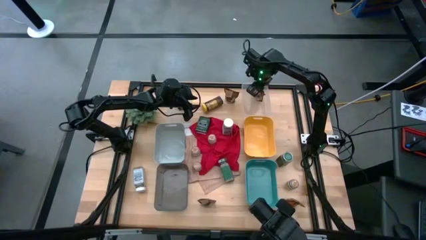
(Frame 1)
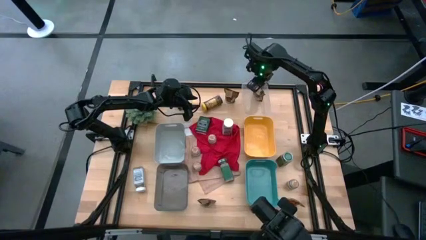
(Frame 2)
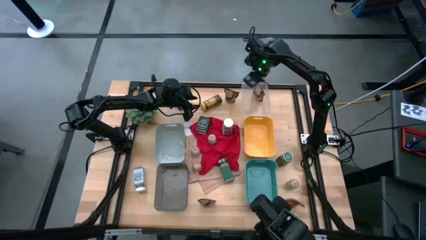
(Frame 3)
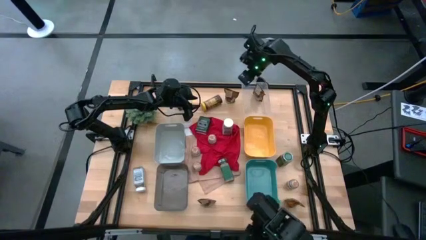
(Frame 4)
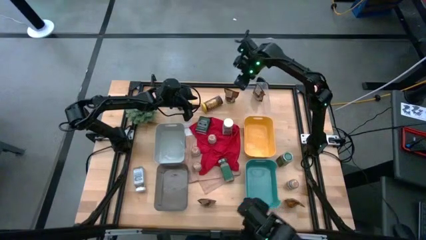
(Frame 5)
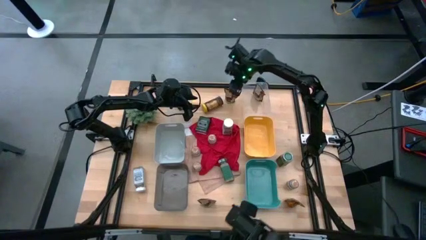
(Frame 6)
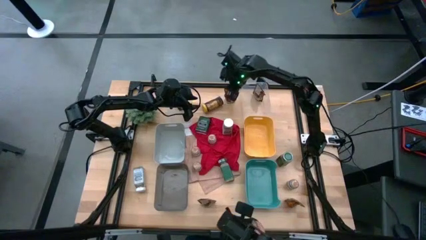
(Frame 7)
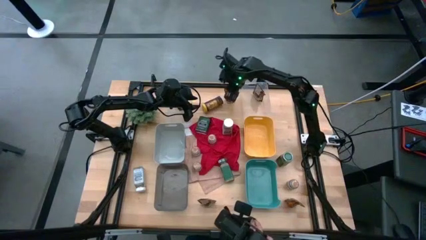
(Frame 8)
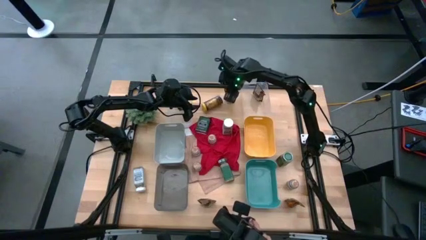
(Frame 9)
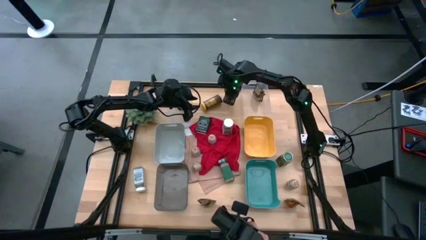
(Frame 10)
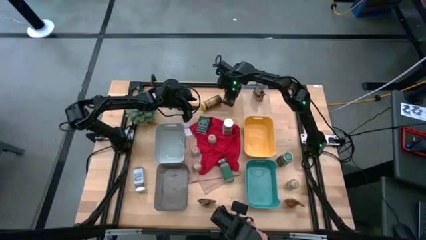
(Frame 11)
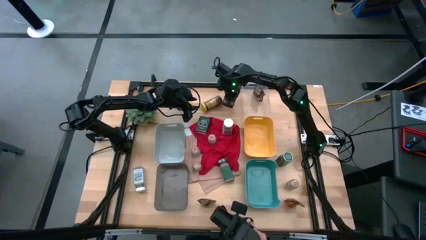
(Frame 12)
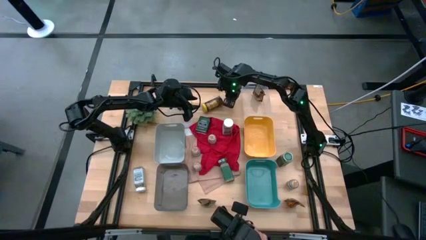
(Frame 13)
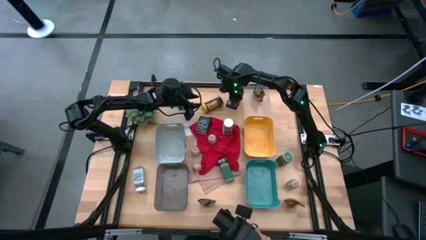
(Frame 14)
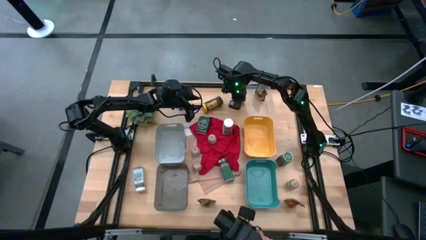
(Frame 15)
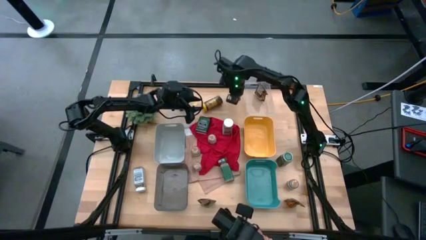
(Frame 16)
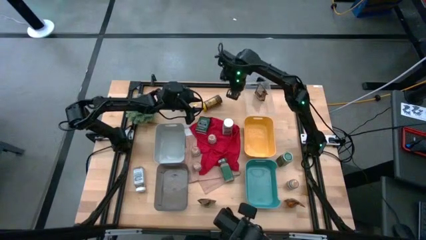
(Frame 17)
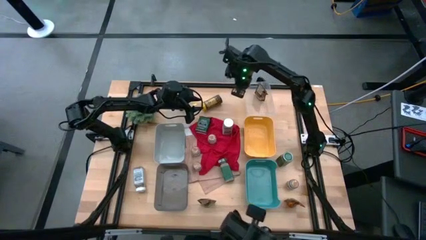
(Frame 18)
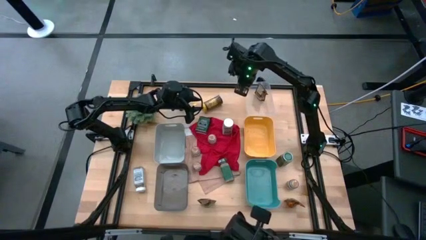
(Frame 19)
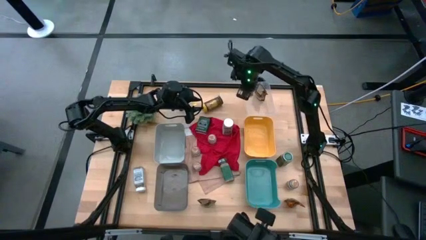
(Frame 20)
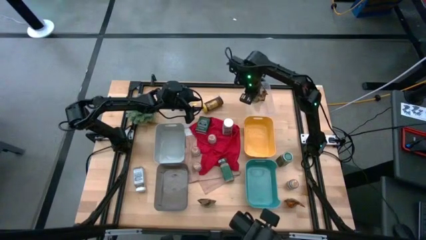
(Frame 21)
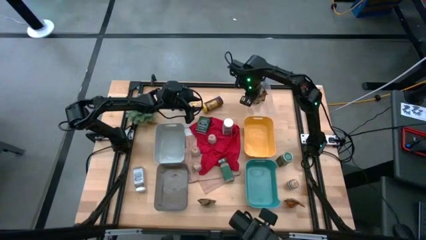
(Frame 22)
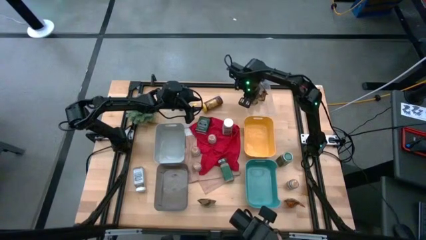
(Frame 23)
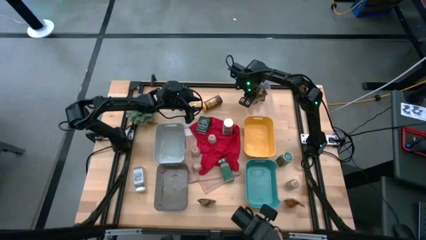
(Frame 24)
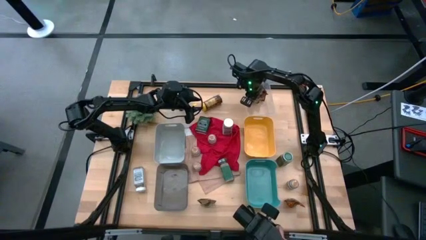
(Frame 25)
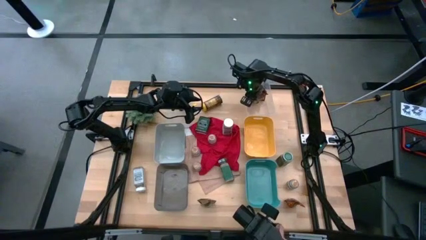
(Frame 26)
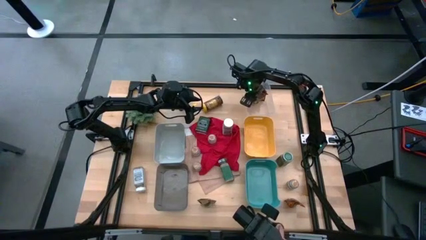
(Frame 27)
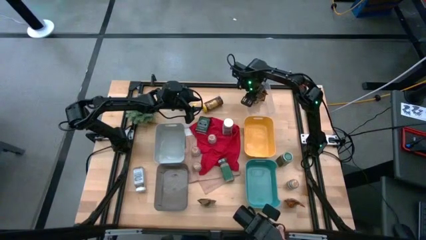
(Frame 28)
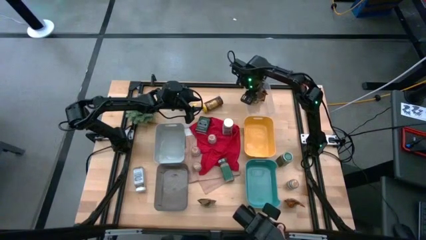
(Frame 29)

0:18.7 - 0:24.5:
Task: Sort spices by type
Put the top center orange seasoning bag into the right transparent bin

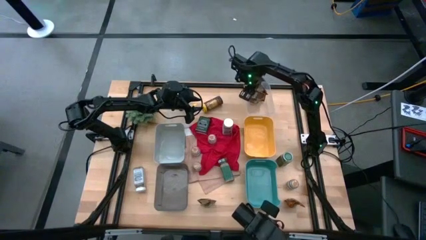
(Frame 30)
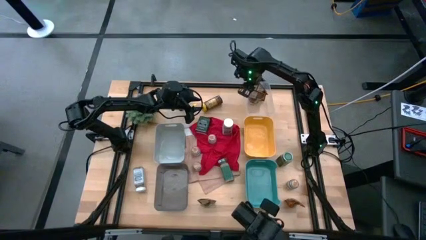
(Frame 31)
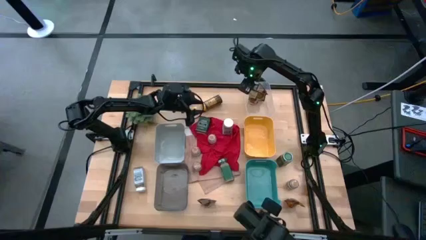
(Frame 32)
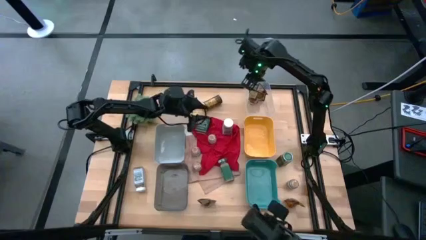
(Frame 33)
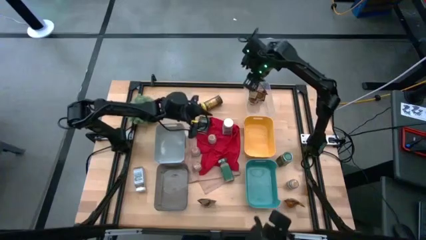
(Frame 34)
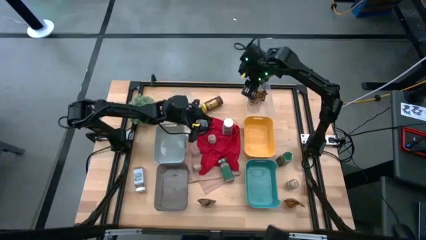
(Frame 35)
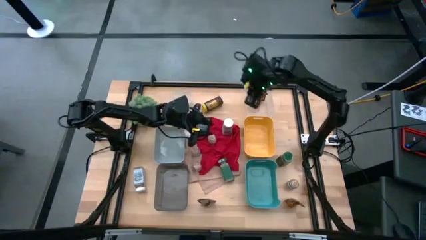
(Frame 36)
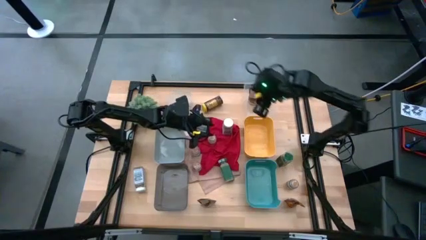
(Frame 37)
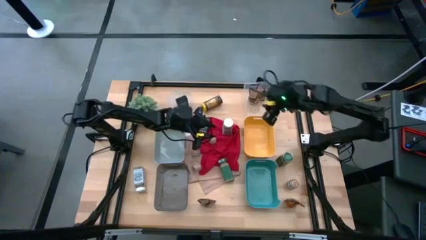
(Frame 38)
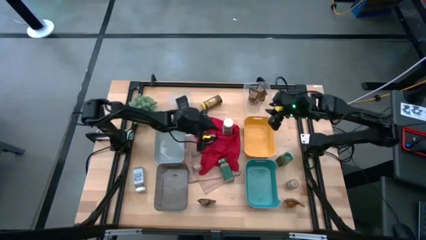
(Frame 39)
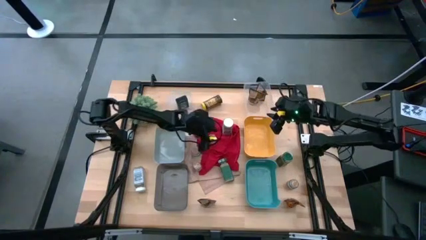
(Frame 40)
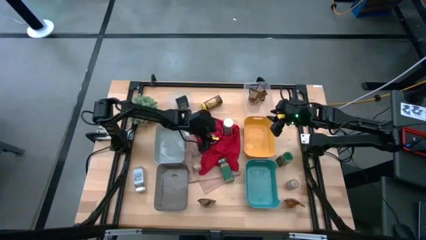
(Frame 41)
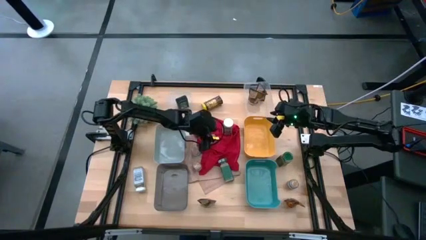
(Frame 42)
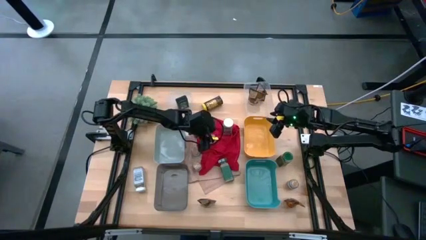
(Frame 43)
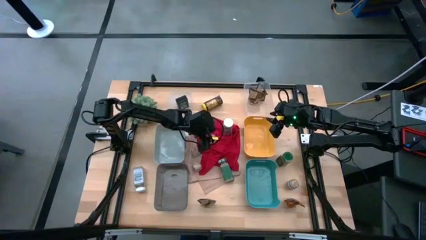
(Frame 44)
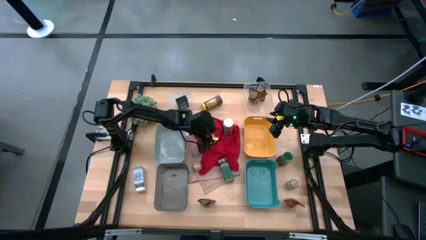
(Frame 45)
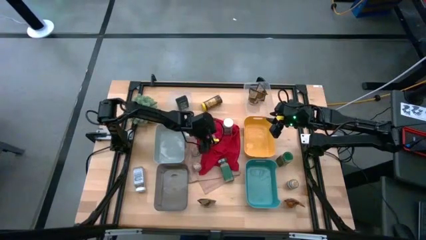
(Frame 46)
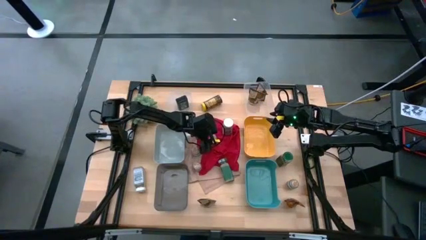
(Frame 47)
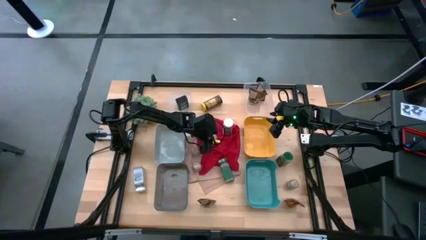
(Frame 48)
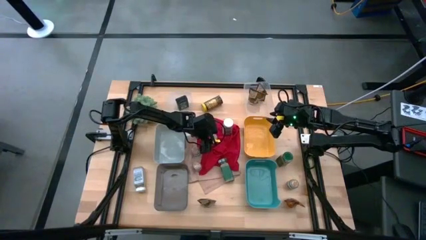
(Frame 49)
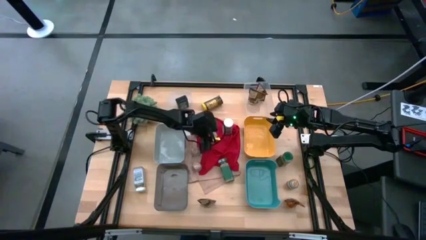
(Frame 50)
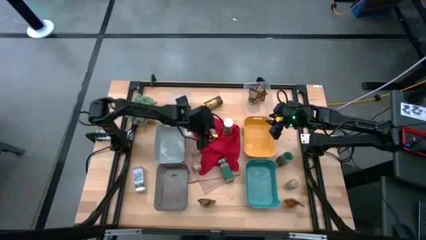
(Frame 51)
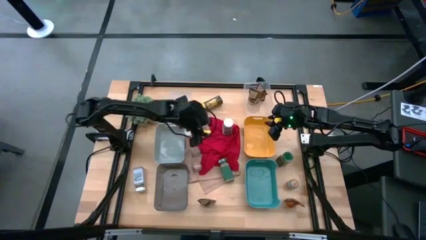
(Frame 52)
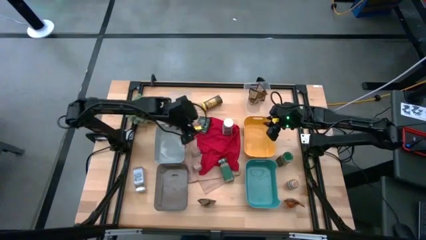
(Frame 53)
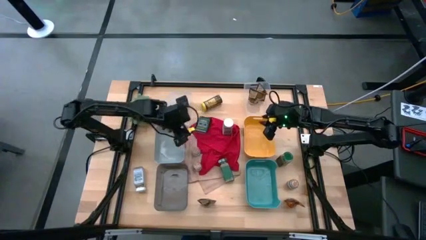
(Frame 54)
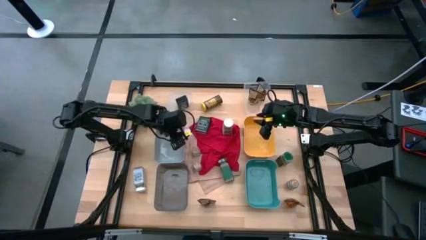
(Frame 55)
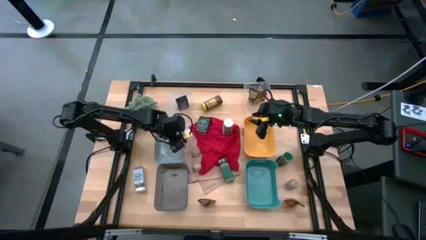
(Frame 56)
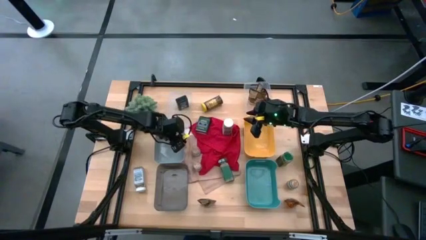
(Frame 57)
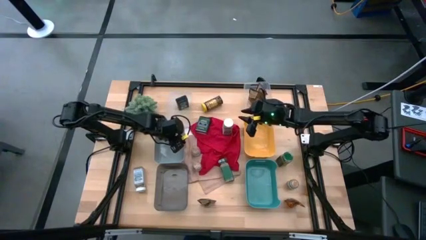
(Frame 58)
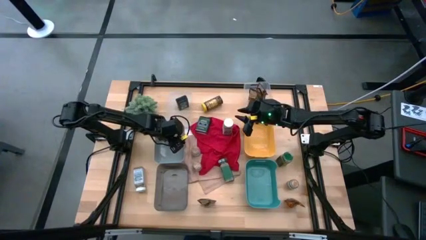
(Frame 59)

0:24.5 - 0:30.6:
Put the top center brown seasoning bottle into the gray bin

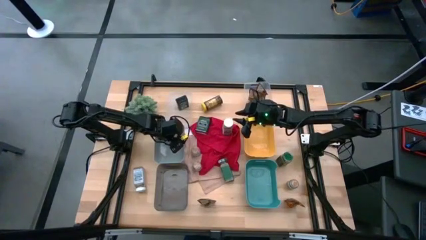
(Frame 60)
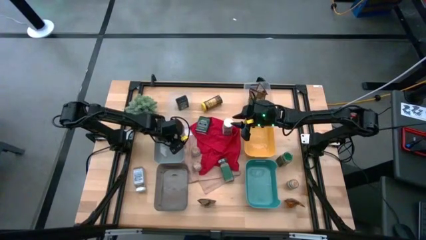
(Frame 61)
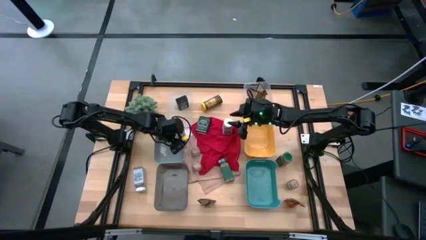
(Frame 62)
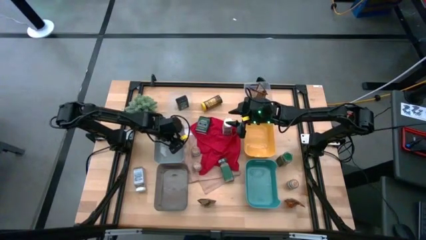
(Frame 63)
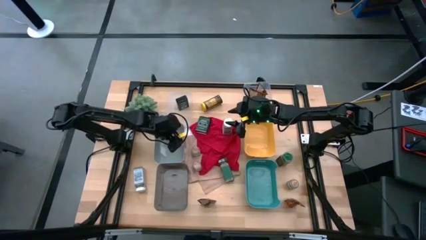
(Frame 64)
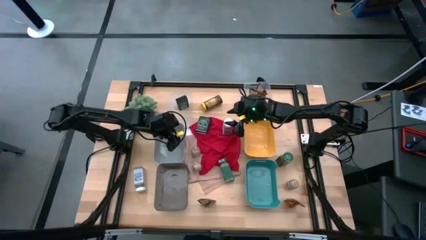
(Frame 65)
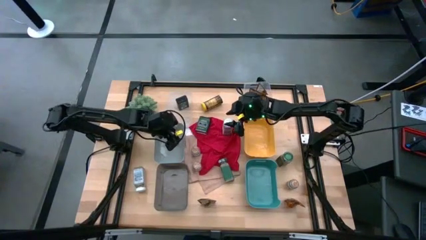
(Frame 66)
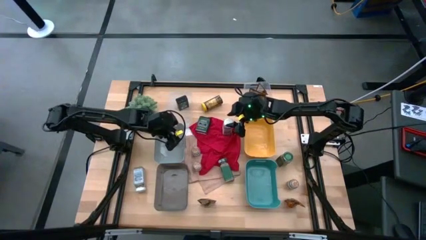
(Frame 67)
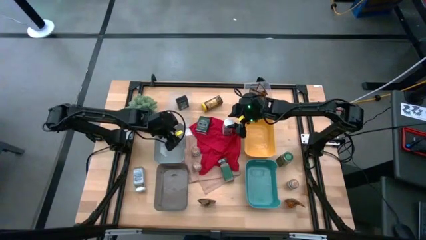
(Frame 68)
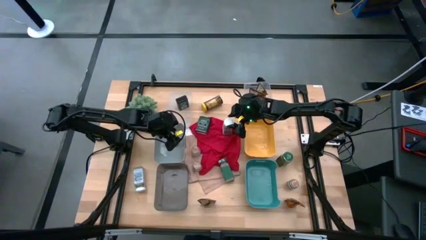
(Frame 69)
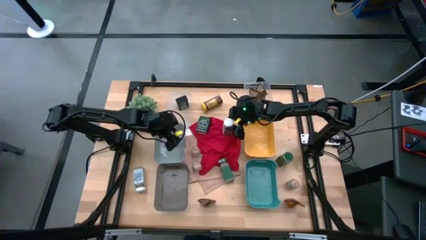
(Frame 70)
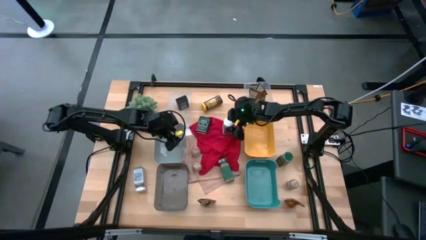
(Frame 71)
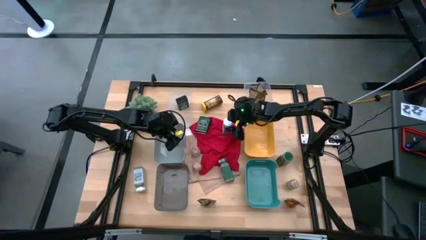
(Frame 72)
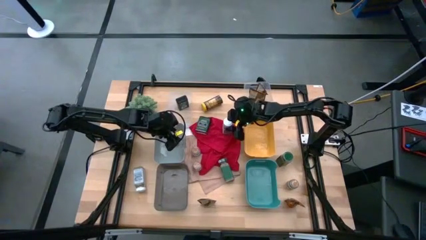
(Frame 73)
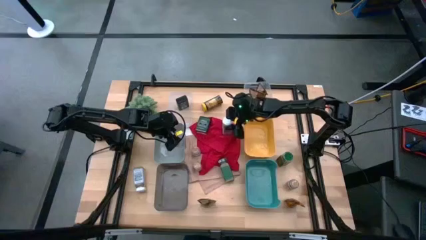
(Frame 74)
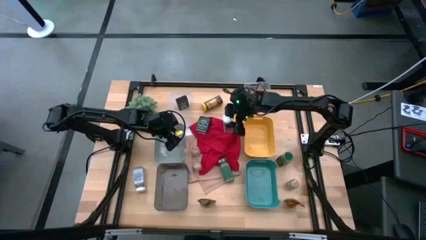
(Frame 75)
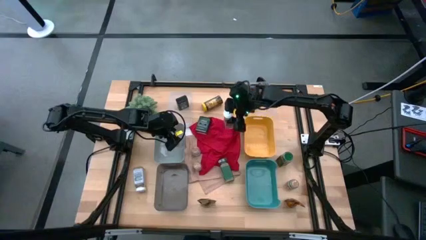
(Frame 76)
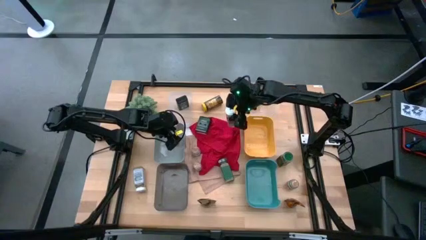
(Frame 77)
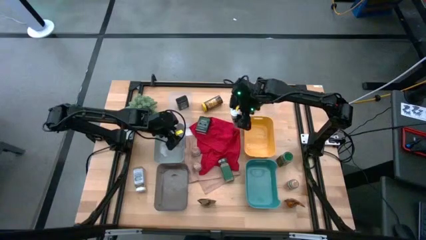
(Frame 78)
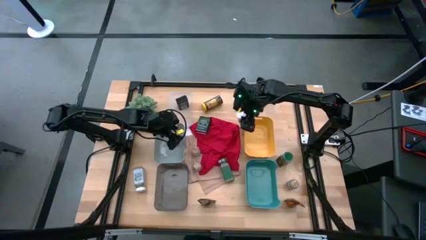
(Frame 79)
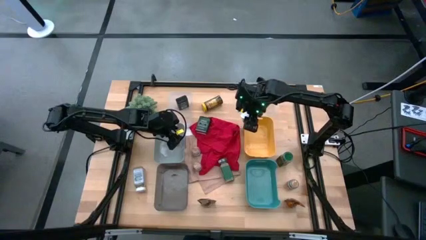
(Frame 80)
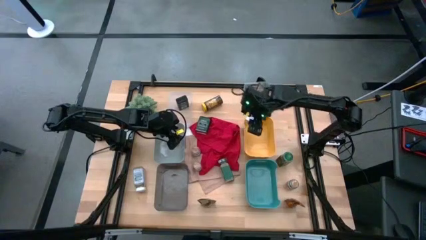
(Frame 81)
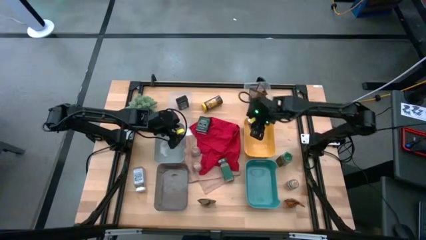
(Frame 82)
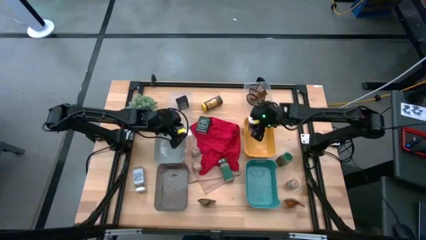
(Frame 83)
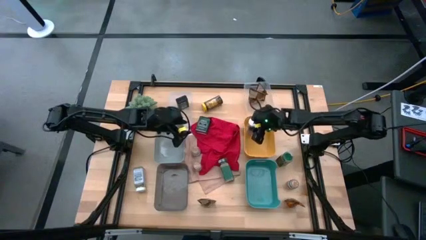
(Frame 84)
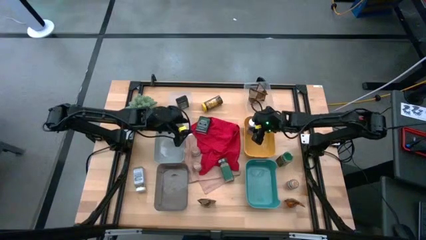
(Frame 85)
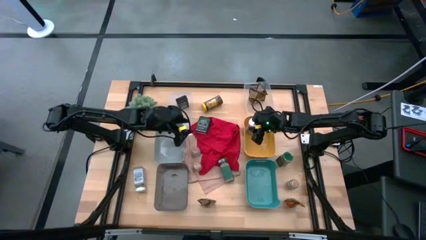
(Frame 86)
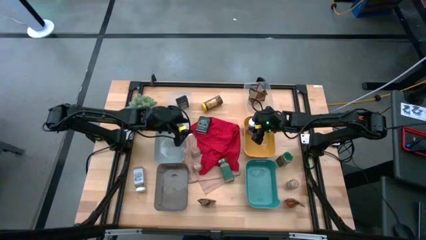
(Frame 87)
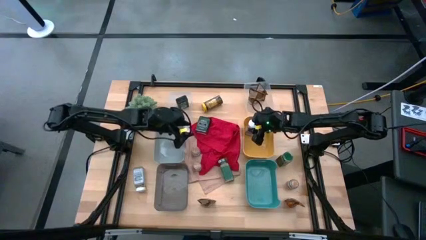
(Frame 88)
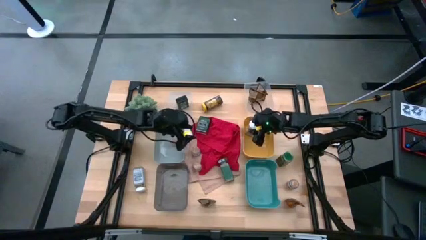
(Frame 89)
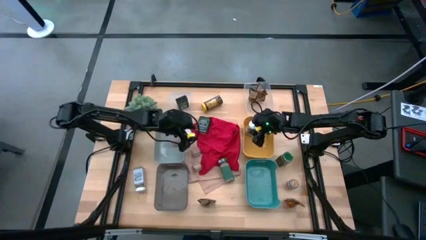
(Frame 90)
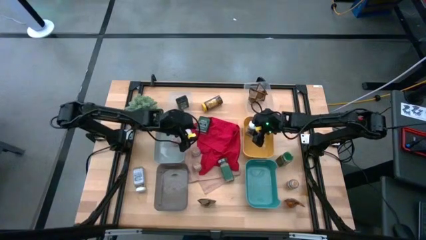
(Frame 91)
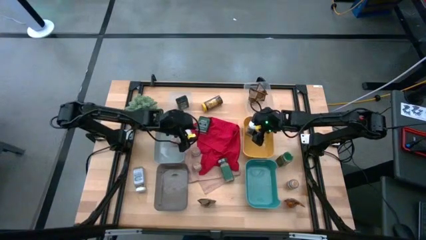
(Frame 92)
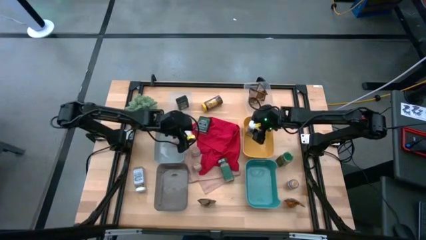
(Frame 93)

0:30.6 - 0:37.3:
Put the top white seasoning bottle into the yellow bin
